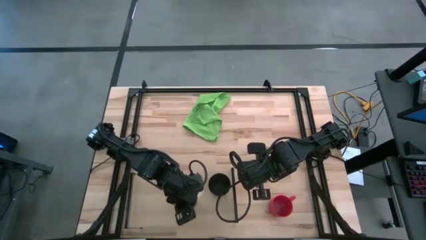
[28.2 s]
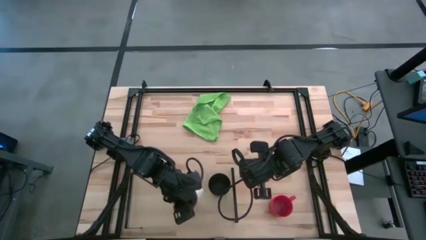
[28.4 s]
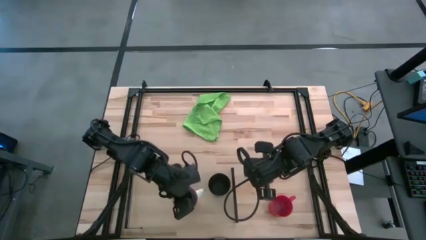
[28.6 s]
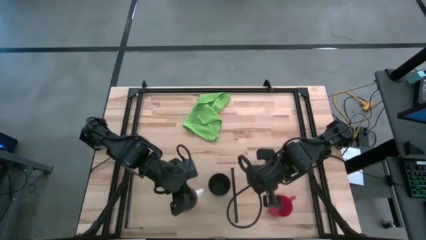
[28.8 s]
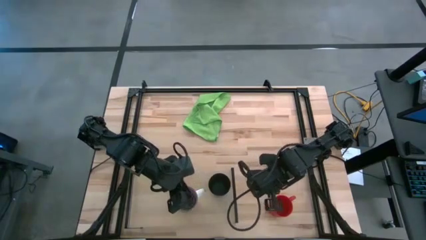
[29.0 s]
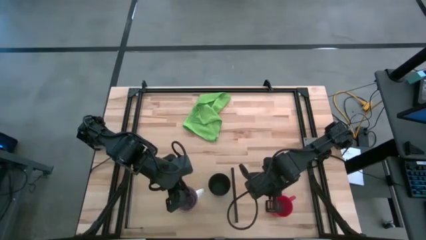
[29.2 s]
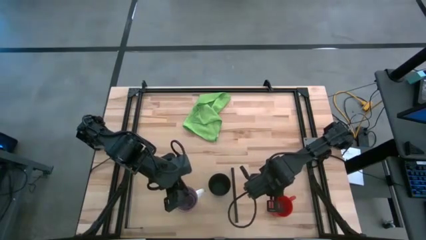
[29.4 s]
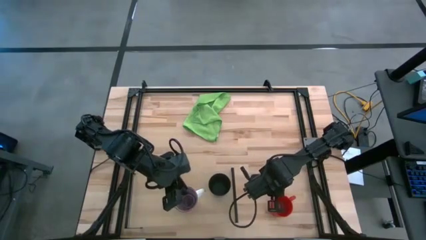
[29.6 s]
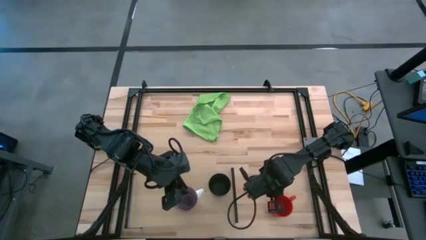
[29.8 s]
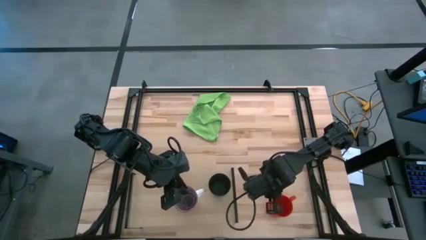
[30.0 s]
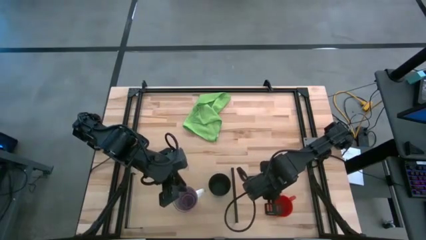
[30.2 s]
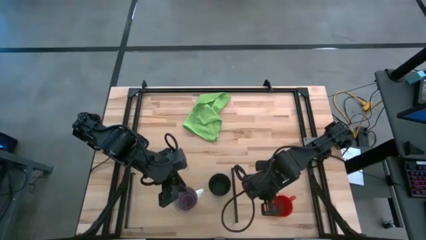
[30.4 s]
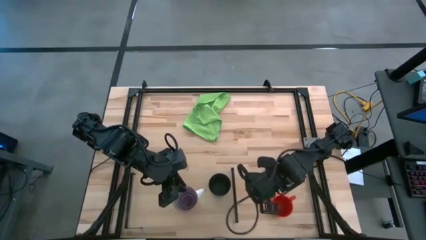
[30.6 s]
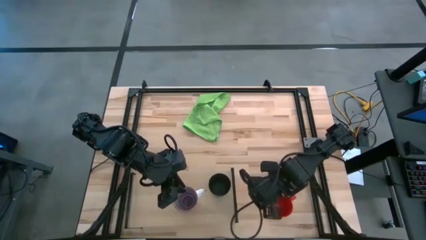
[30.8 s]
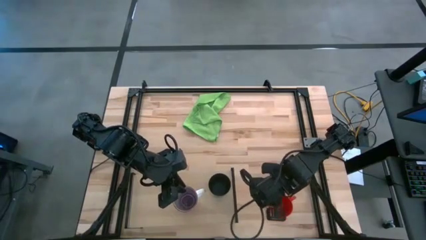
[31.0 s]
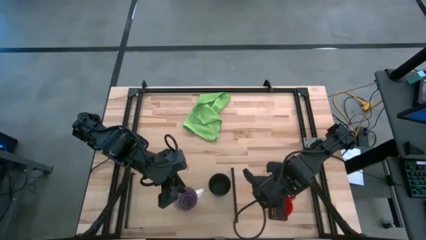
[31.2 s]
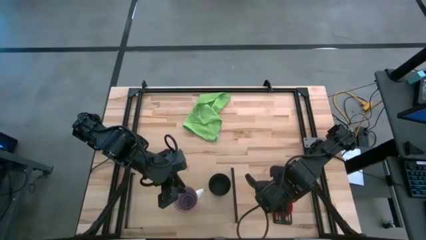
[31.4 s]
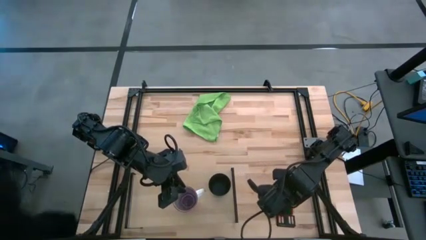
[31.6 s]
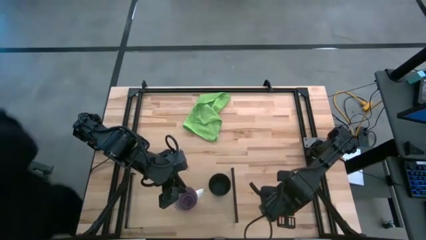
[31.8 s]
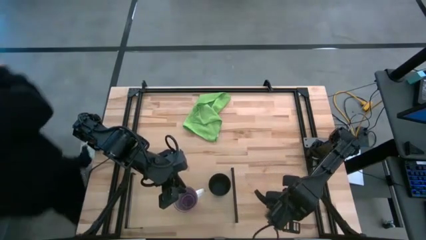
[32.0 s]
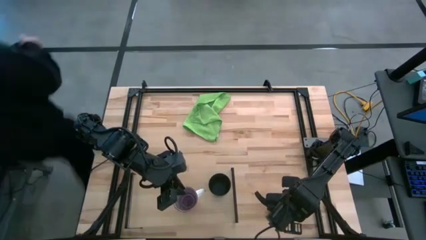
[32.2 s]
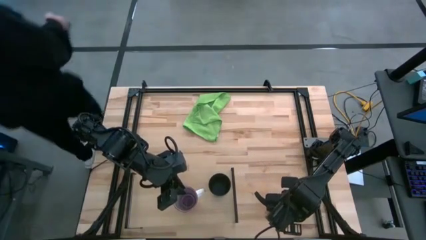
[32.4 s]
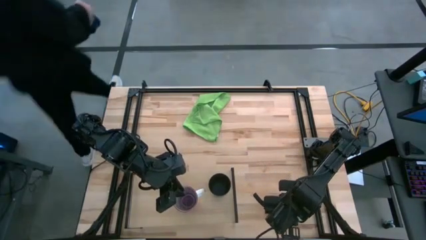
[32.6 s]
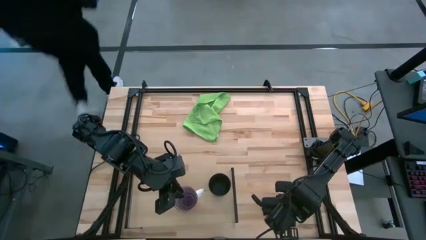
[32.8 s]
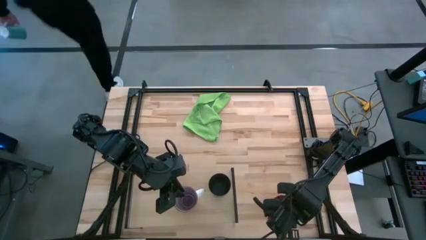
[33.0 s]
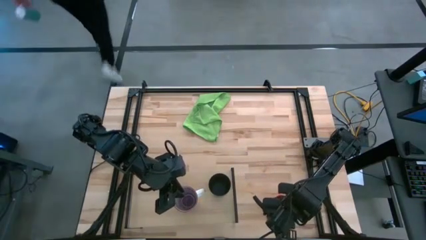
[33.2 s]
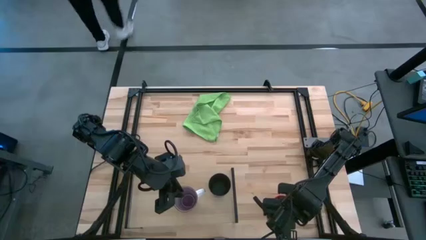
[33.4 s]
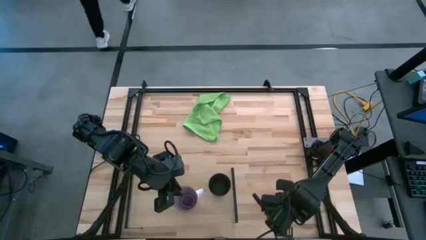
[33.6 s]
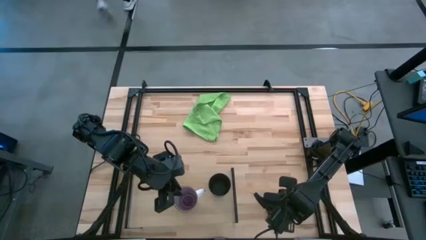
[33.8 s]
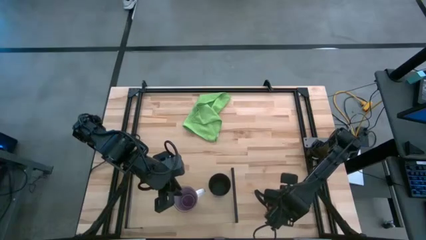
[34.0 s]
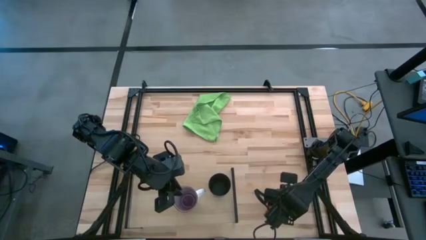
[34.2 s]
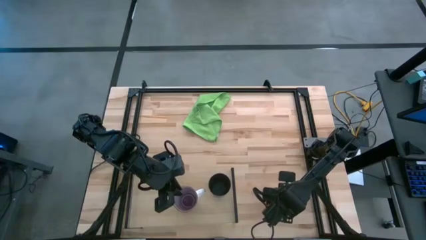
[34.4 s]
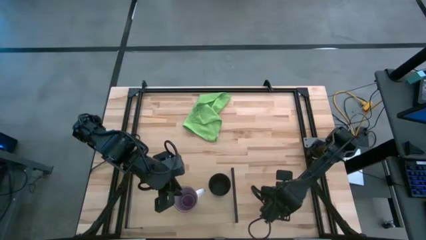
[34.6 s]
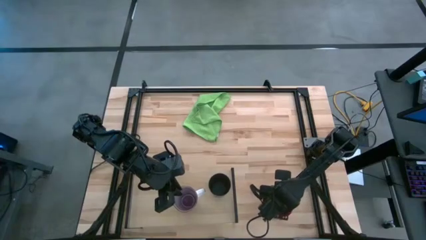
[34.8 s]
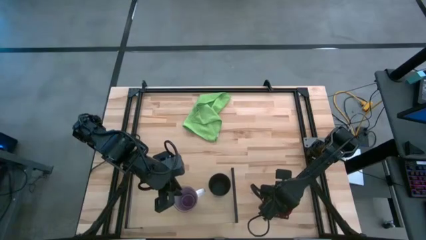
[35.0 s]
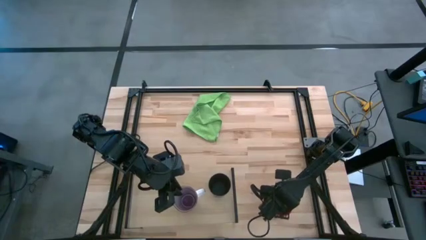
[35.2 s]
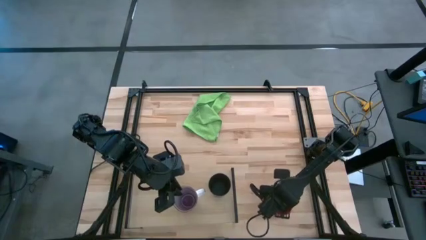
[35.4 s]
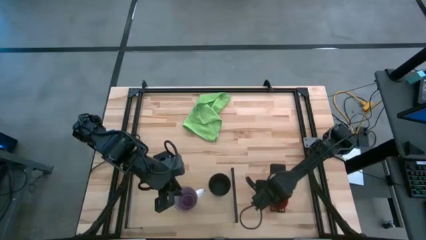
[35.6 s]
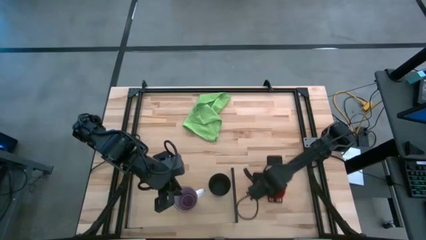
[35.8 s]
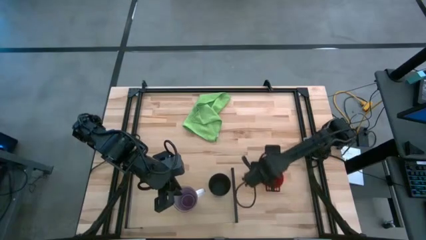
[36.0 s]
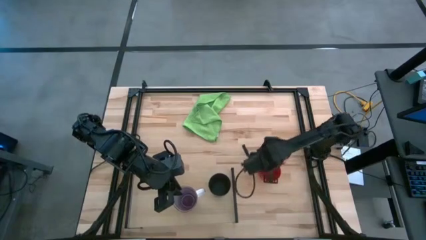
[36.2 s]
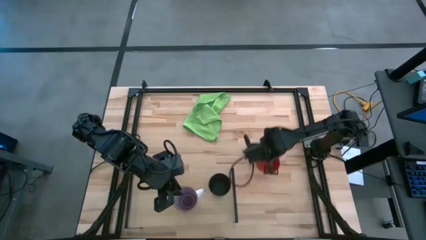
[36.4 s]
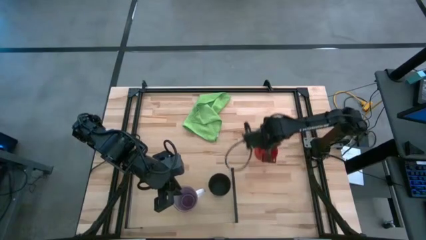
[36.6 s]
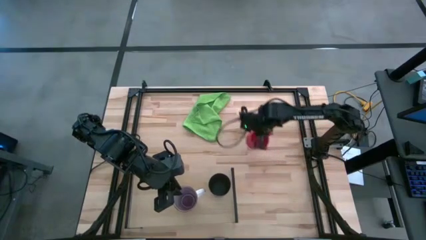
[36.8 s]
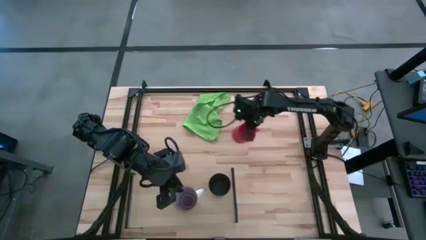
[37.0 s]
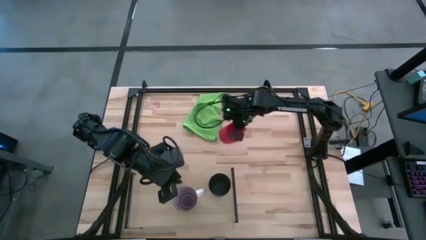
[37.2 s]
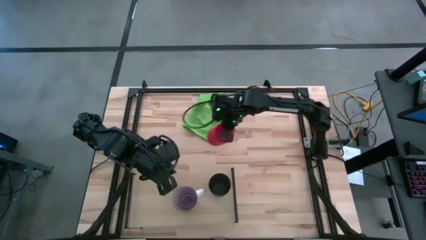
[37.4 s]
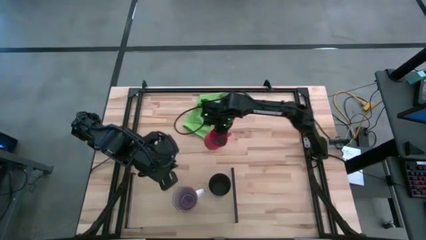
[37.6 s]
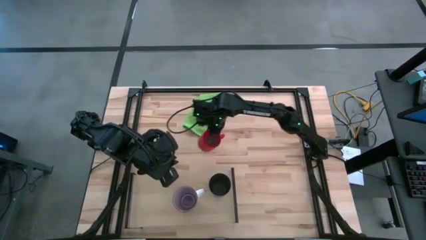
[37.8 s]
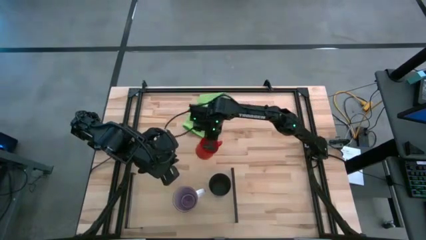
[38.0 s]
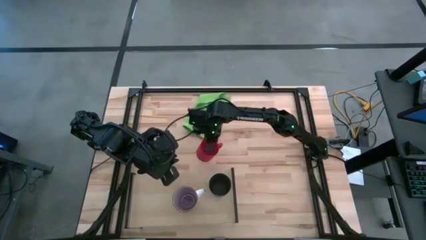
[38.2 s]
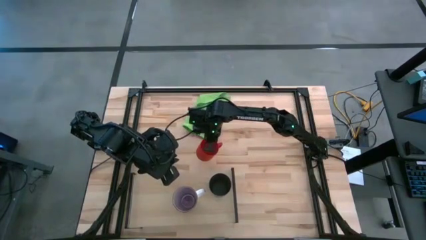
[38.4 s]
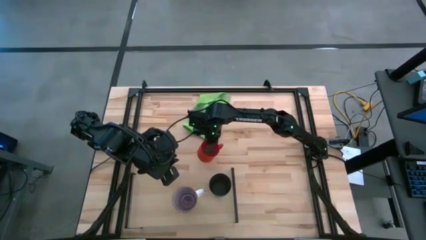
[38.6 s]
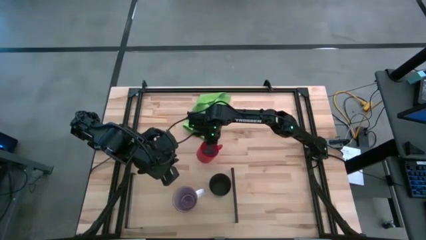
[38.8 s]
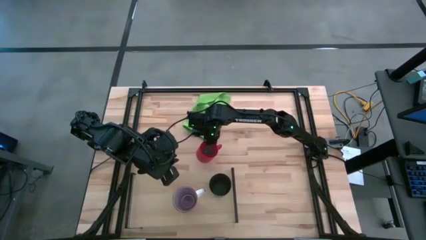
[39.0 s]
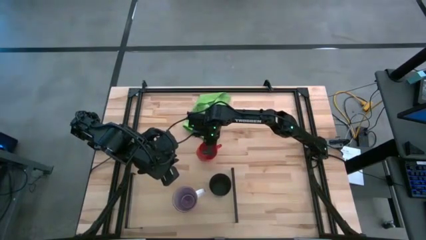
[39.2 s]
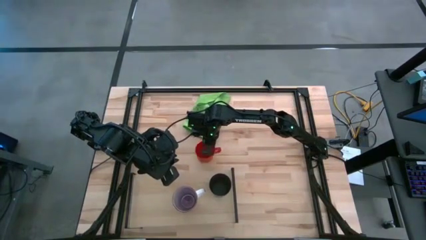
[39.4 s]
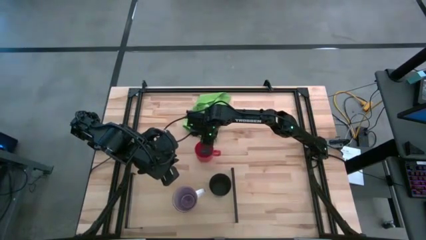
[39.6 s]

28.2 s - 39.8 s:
Task: Stack small to large cups/mugs on shelf
Put the red mug on the shelf
